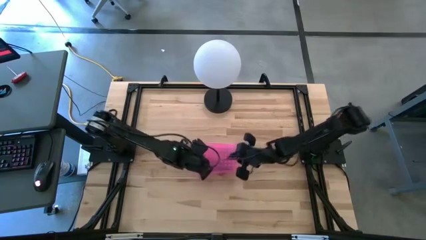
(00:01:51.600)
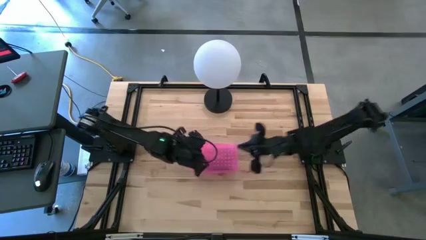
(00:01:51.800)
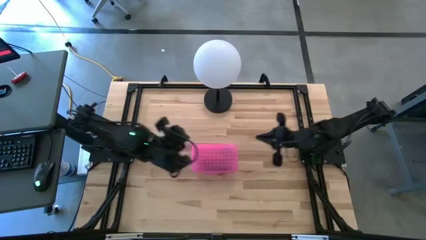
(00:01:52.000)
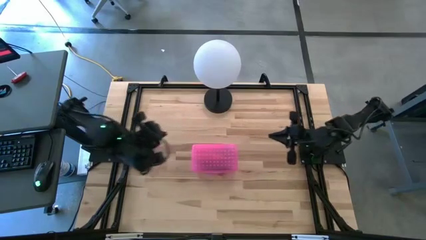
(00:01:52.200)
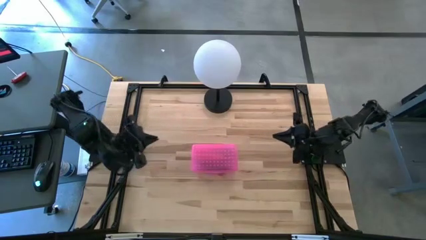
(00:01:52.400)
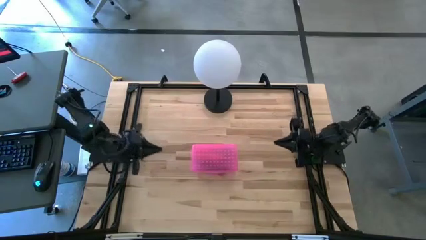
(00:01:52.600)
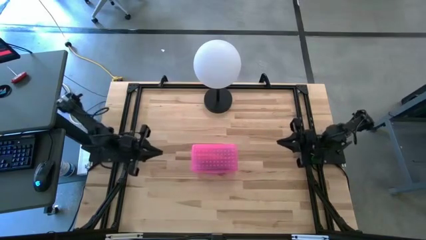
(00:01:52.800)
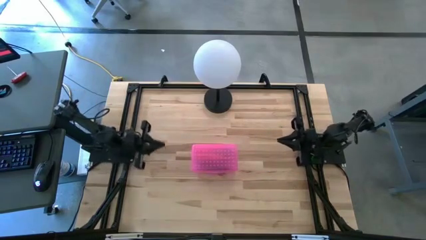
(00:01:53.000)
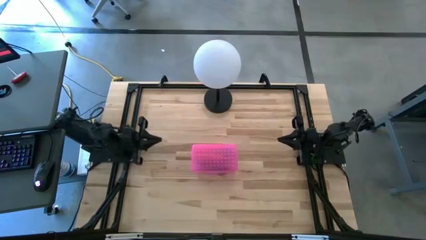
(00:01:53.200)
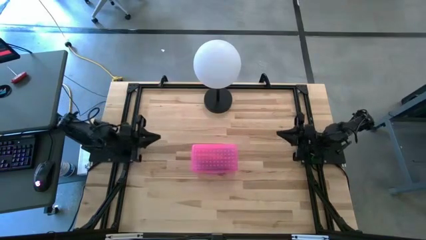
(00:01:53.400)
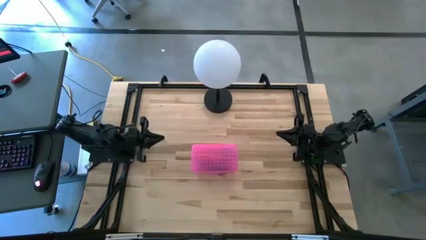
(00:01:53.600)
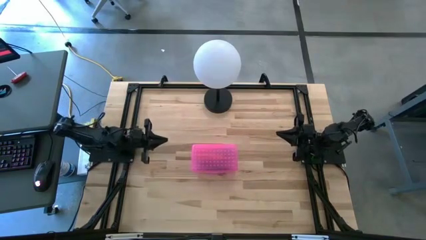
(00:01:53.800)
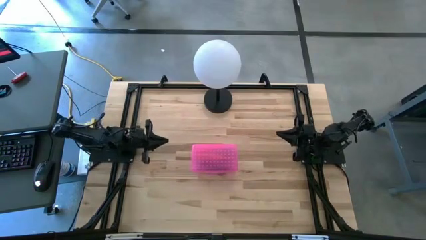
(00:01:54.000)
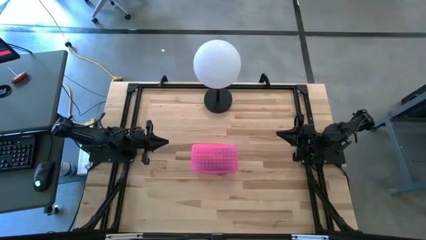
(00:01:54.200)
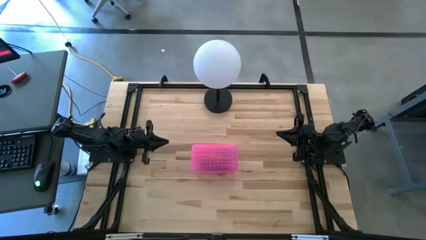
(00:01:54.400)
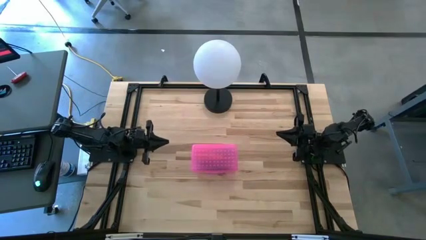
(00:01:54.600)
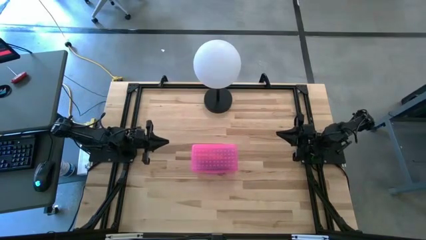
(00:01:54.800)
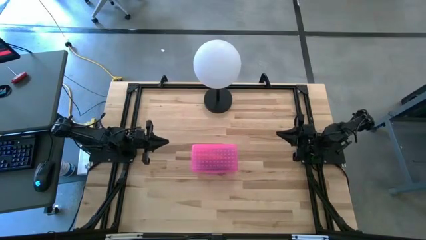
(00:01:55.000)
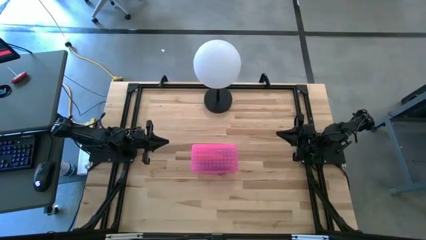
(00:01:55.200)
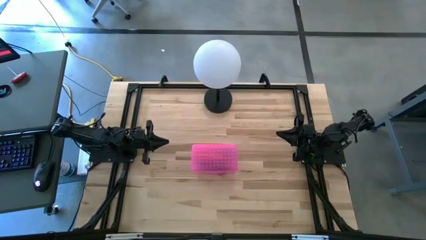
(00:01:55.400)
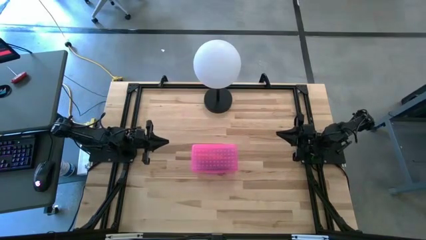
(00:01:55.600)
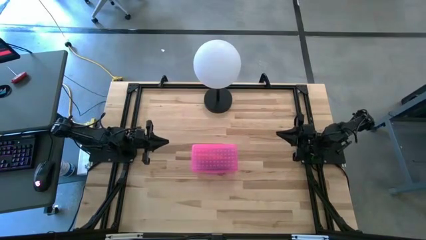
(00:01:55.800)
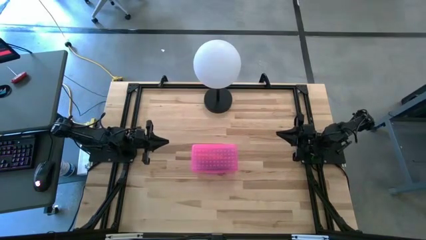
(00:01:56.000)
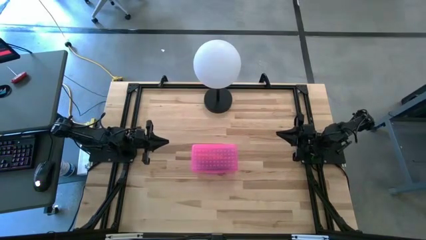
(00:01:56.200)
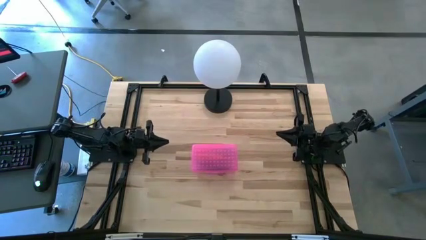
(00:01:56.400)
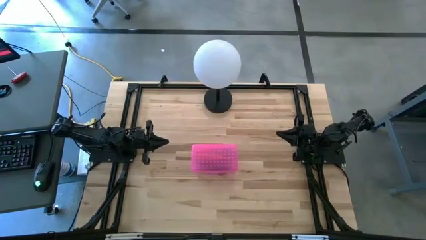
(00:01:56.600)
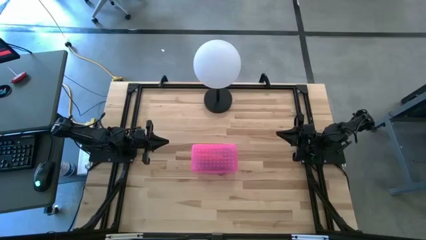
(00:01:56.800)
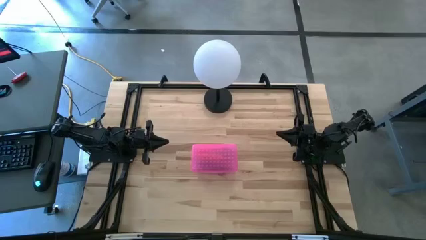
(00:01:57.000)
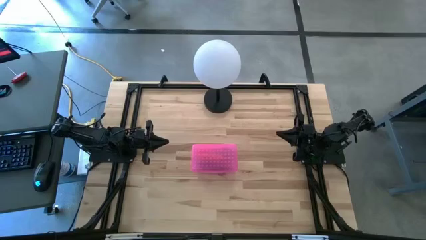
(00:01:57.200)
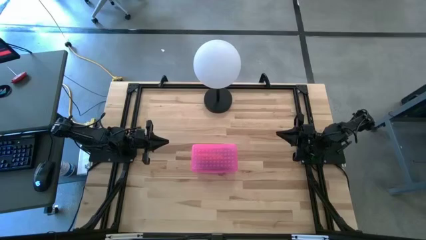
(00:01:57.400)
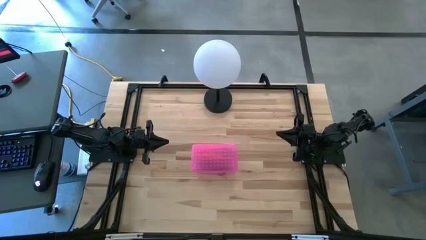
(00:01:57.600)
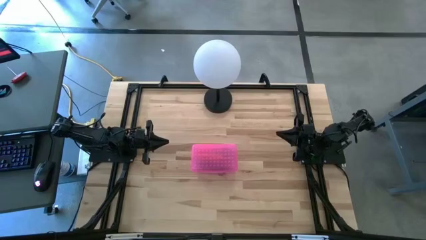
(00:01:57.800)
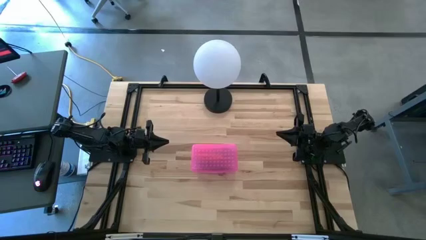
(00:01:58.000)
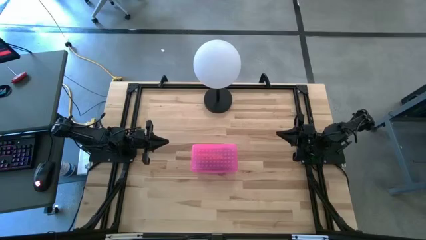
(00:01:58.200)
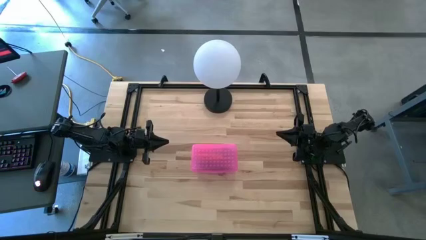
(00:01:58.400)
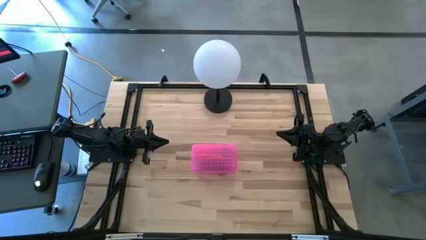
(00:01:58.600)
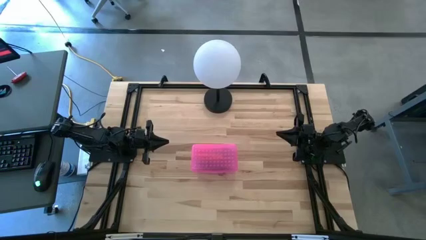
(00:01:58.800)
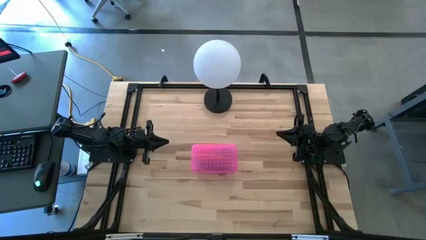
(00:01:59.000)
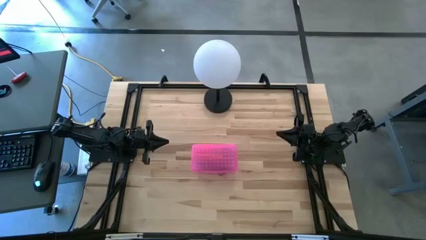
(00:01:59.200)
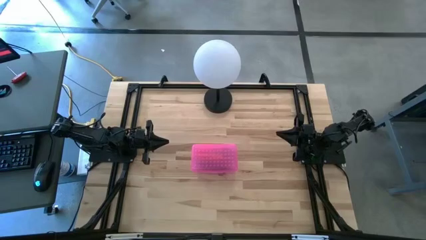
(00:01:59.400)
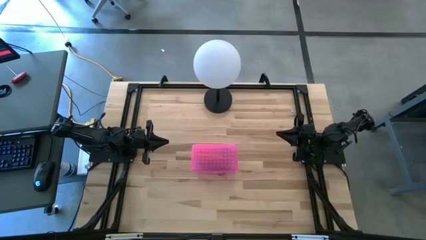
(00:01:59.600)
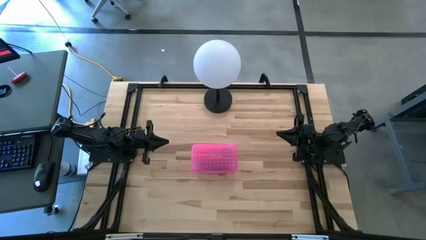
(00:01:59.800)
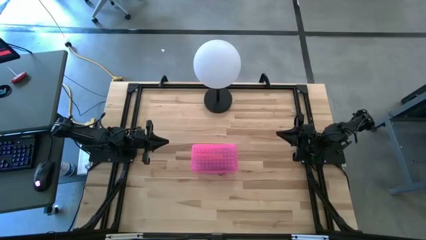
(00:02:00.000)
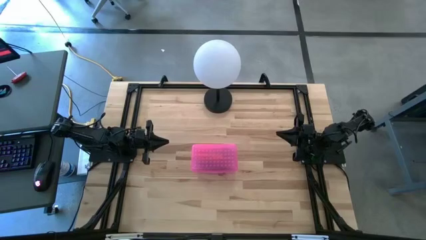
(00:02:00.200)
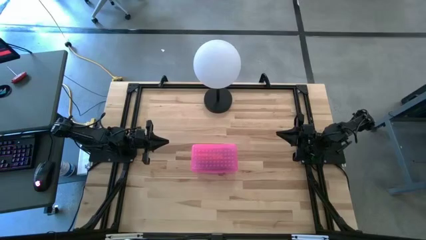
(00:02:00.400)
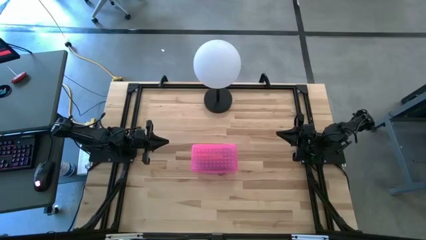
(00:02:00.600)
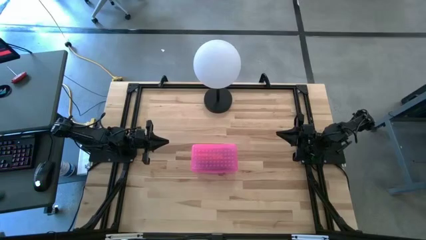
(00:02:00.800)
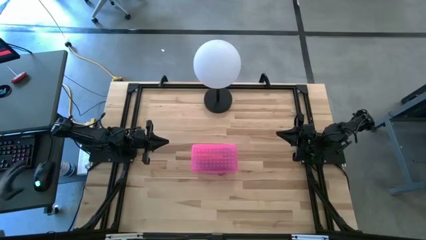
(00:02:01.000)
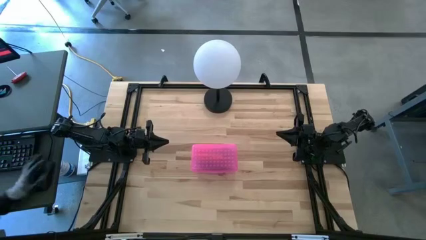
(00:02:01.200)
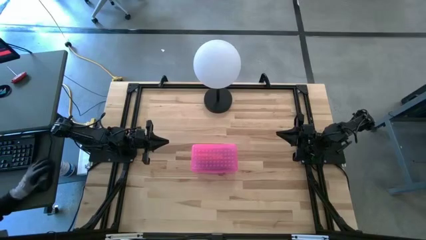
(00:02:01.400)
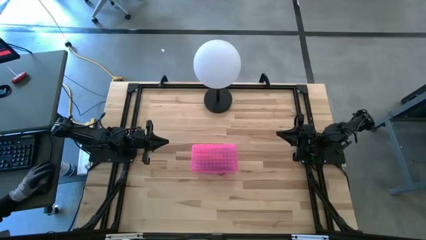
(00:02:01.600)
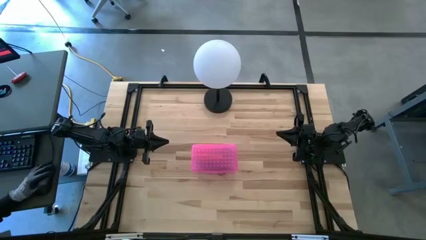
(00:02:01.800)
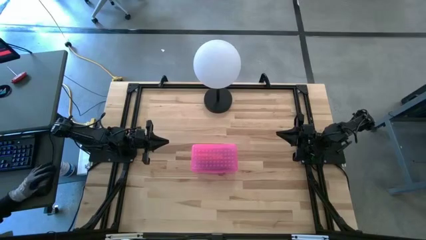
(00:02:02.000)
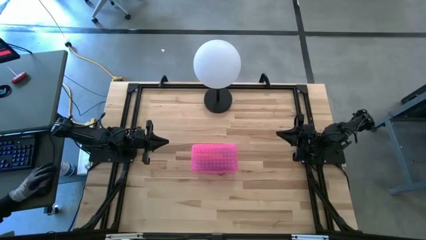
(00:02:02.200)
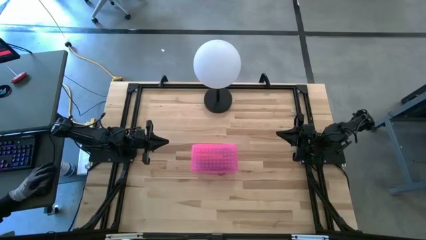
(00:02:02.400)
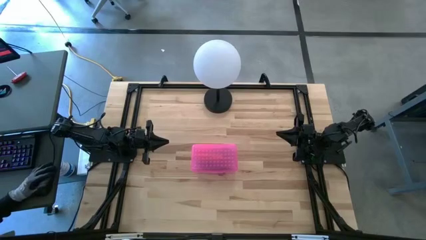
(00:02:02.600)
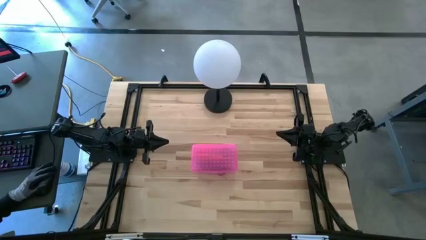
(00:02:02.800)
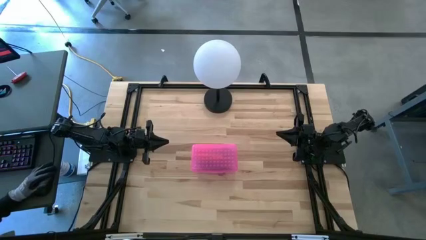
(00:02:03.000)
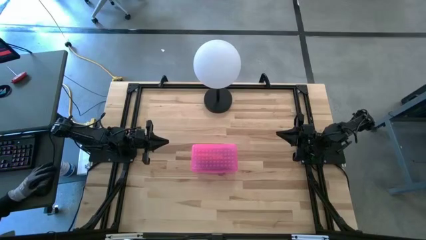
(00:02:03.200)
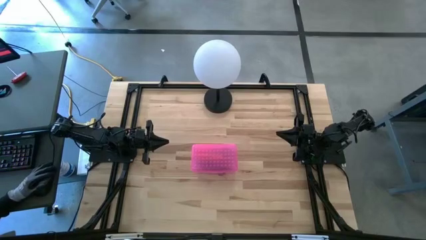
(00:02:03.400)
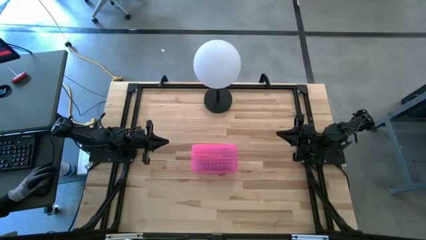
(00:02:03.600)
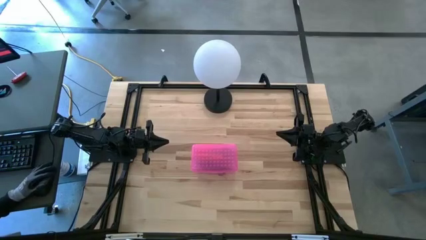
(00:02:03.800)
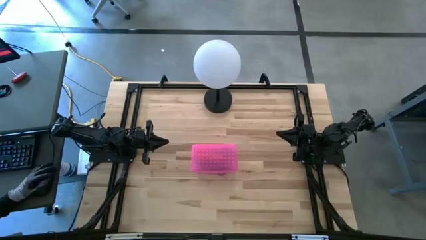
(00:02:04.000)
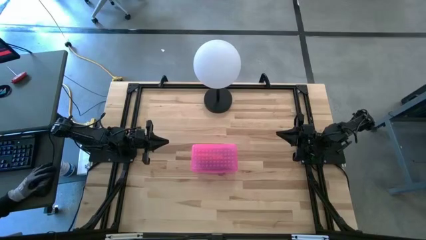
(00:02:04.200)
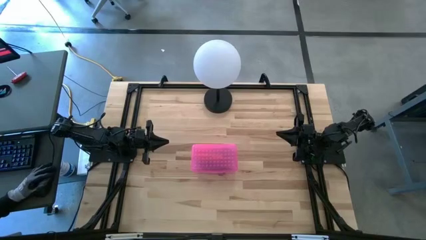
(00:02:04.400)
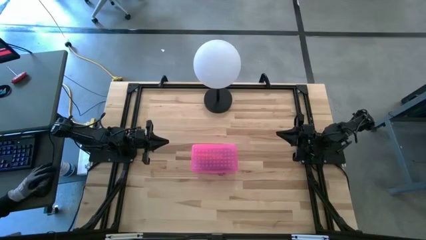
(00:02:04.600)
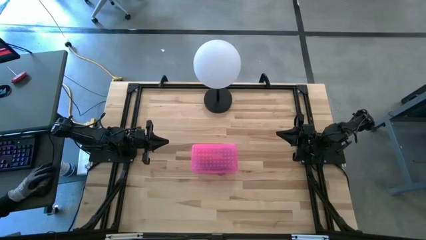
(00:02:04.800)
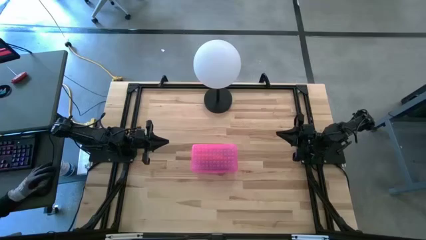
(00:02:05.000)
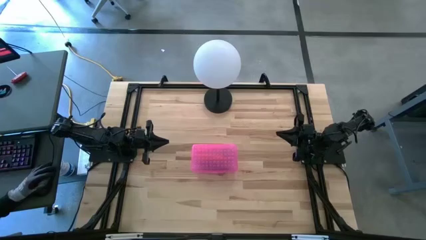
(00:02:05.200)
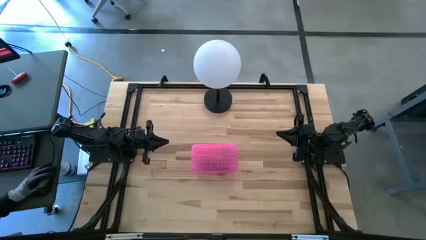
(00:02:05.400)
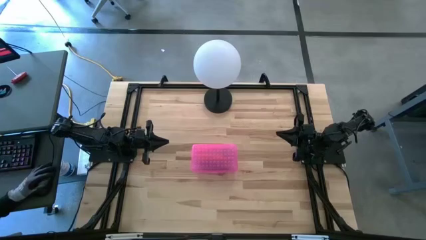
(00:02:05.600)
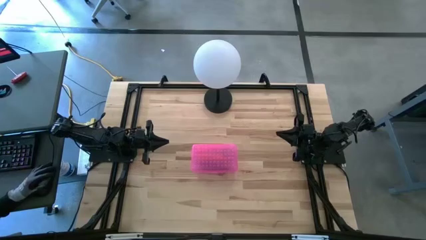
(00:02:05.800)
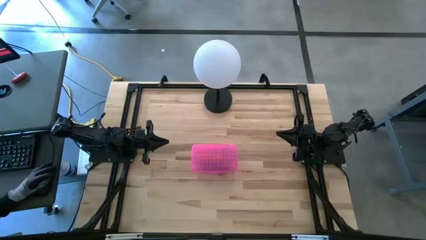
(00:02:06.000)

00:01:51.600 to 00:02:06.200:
Task: Pick & place school supplies into a supply box
Return to Home Position
